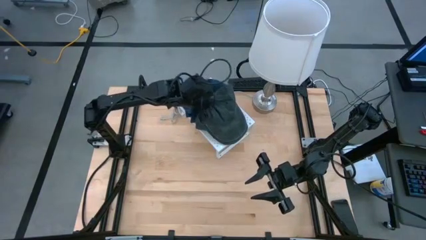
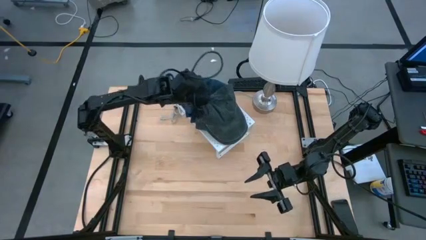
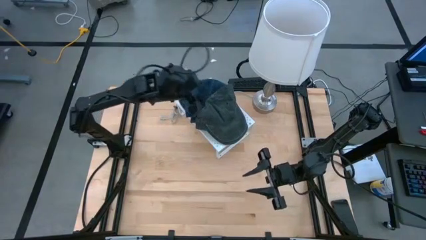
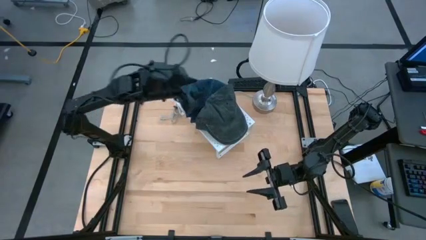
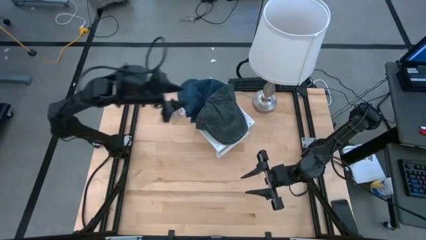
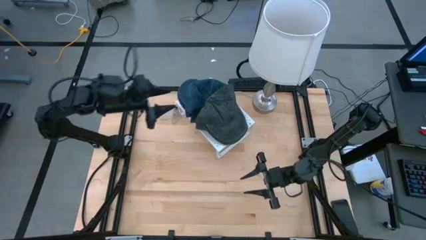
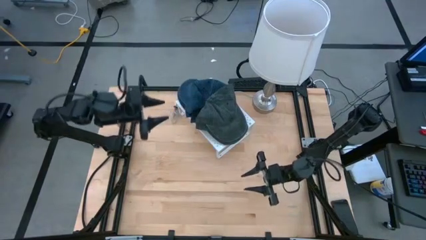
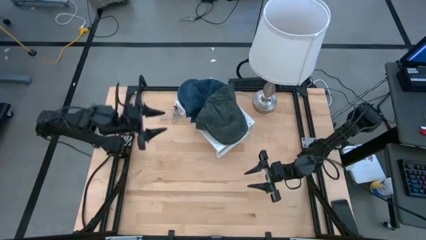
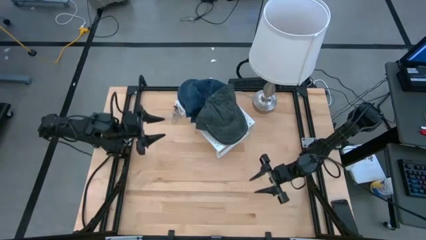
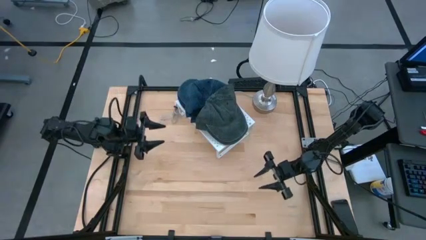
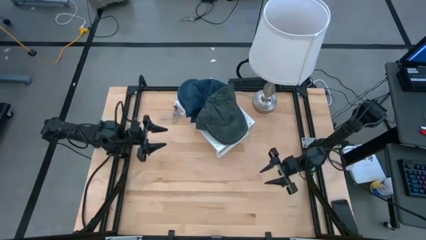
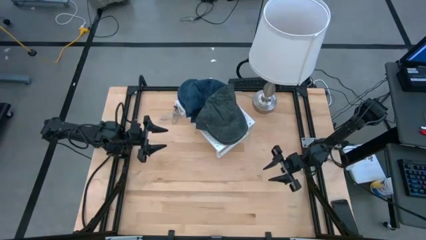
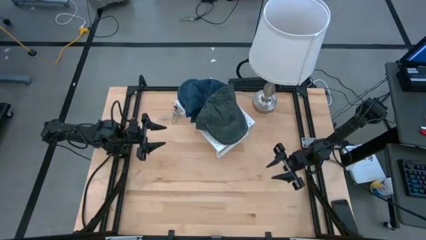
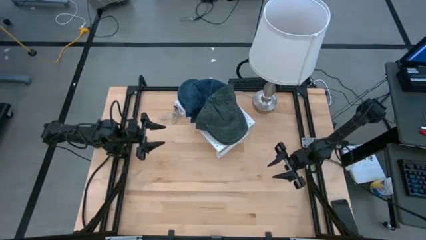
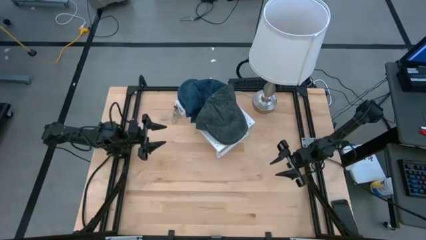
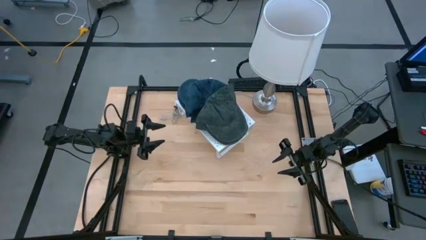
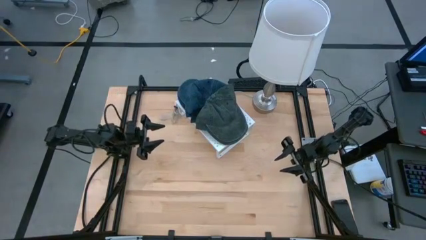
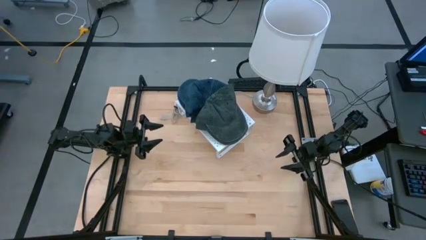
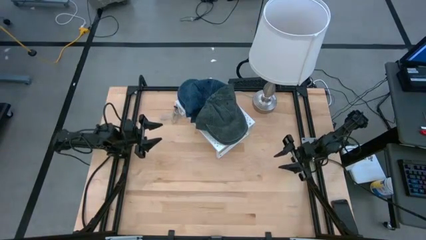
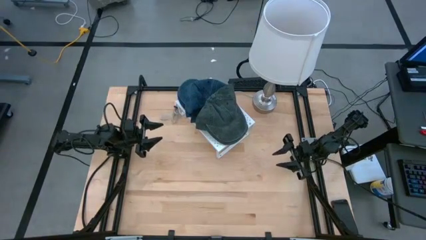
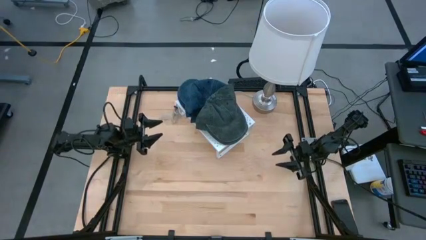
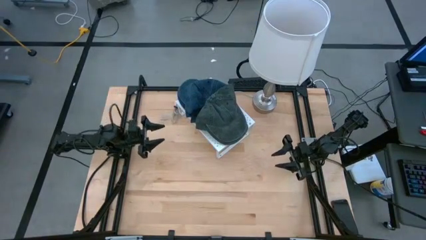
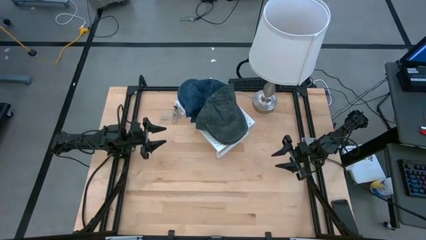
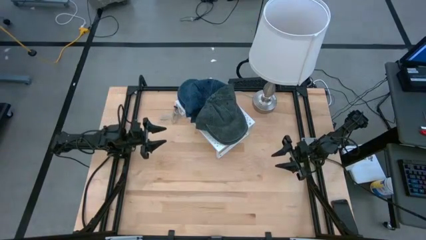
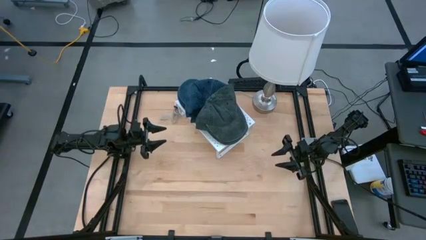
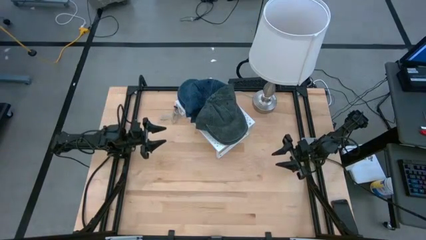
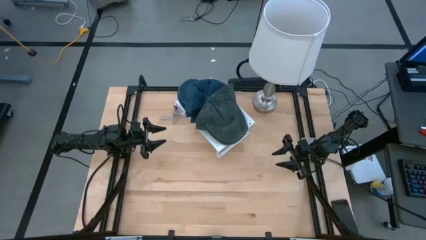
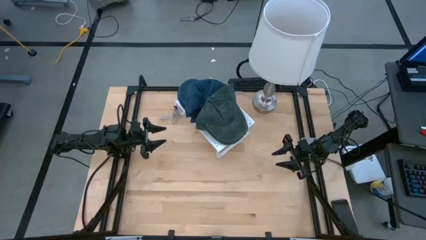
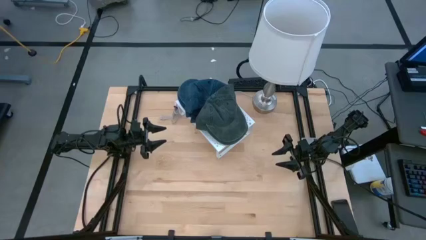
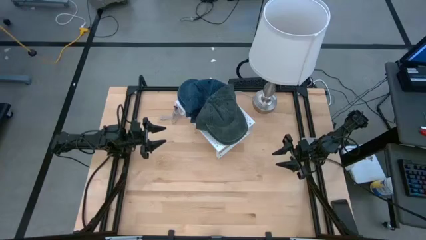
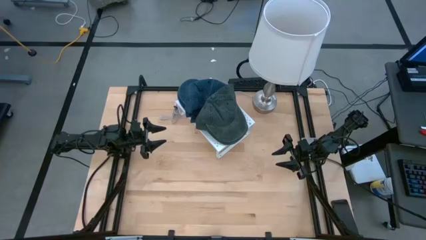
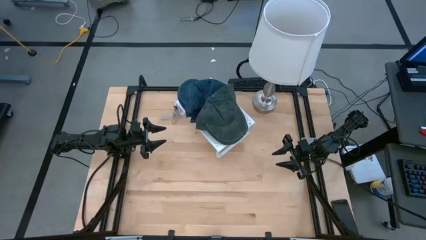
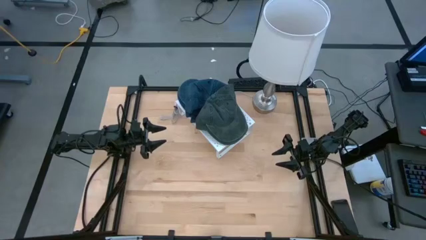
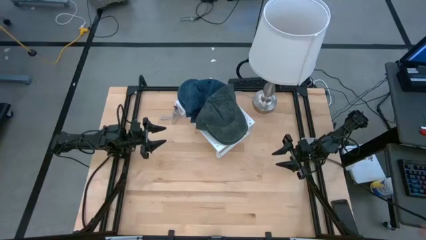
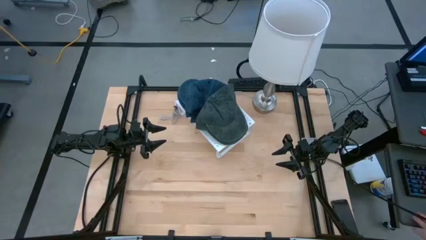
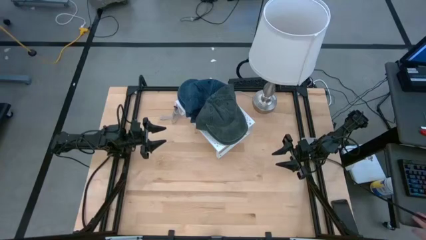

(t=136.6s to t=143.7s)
Task: Pick & Place hat
Return to Home Position

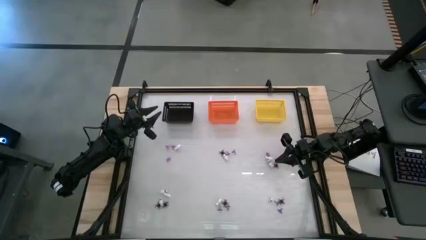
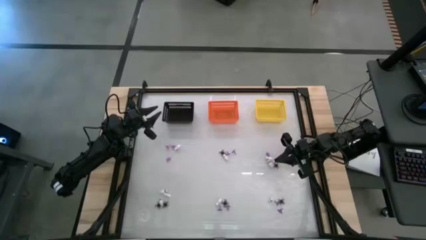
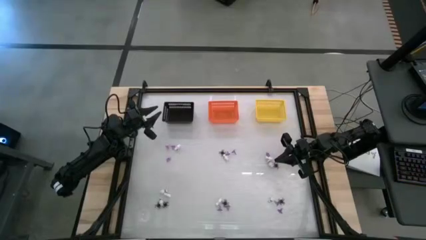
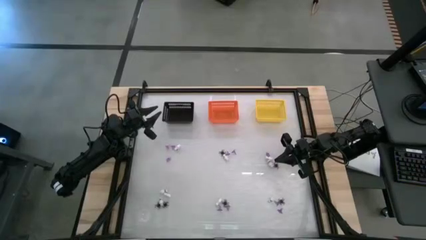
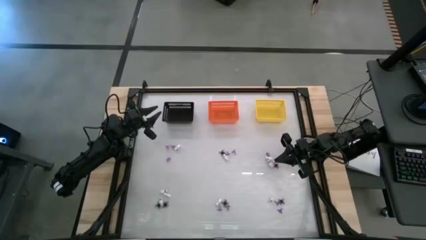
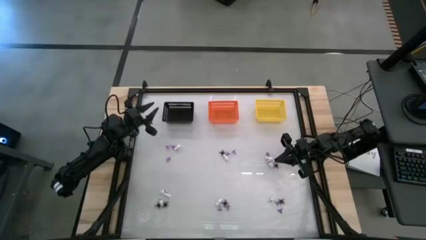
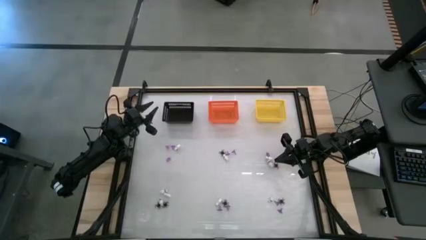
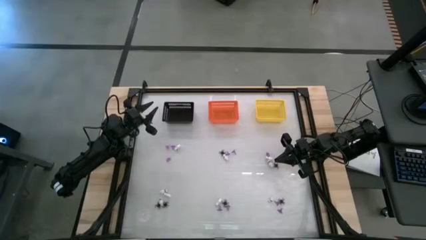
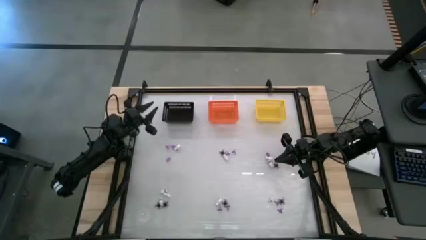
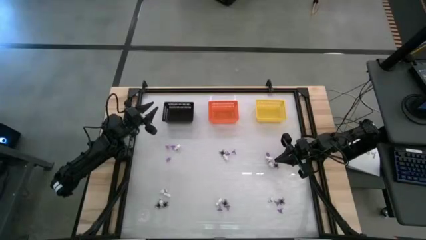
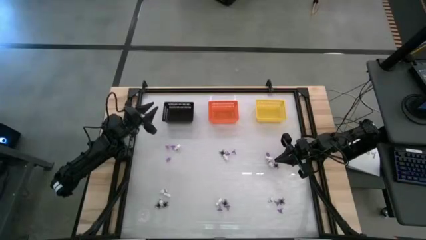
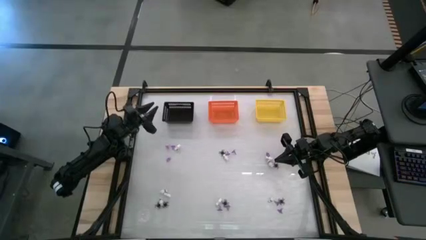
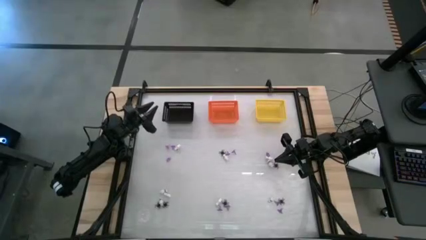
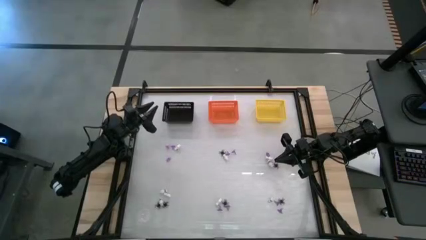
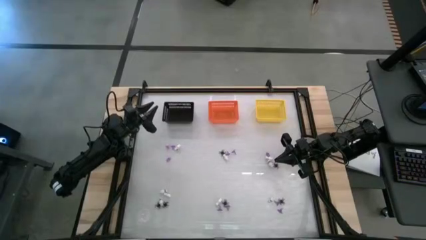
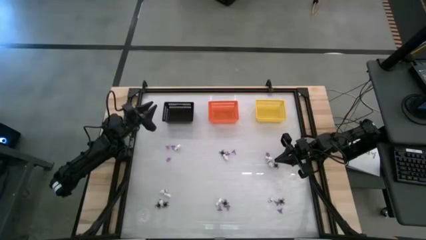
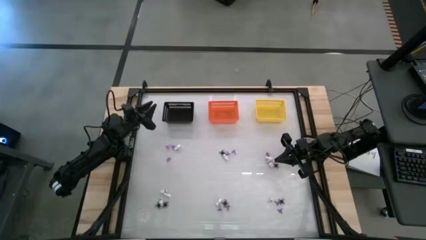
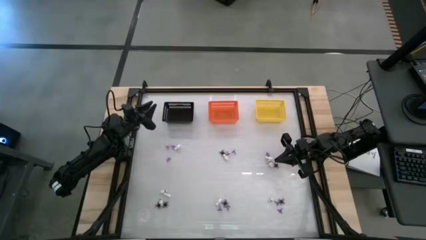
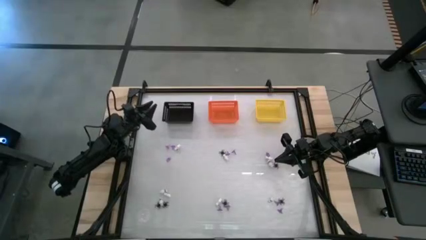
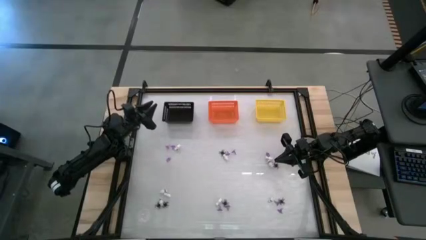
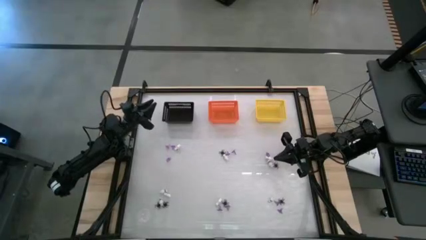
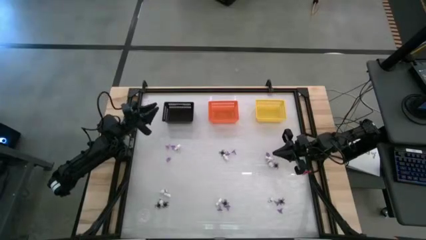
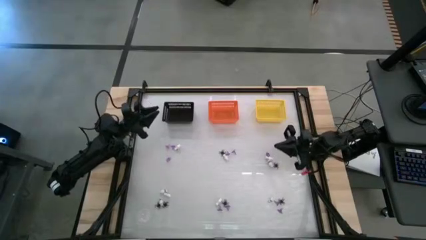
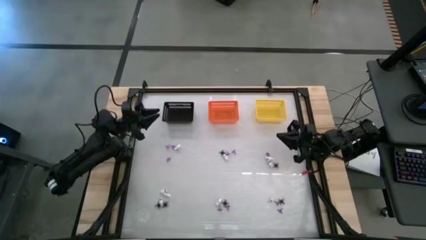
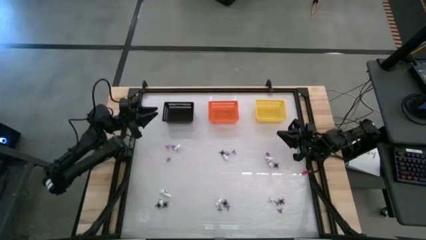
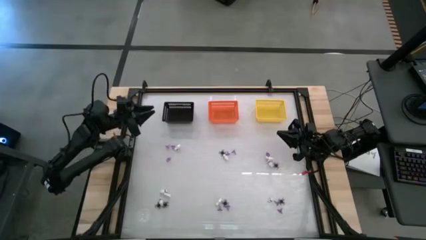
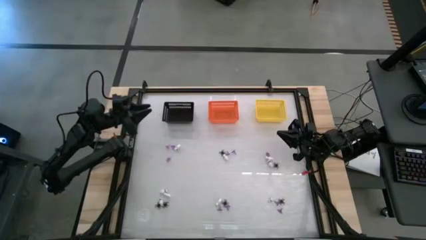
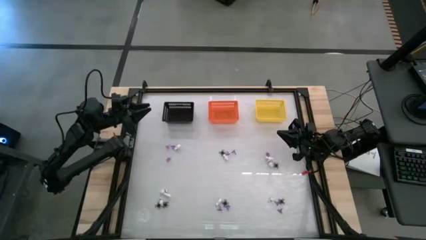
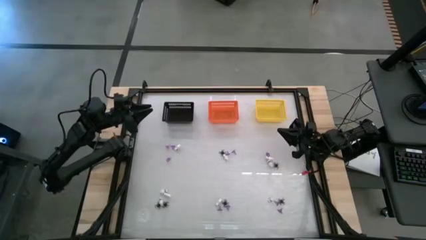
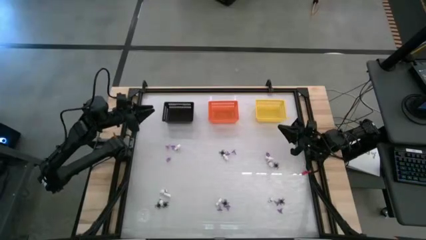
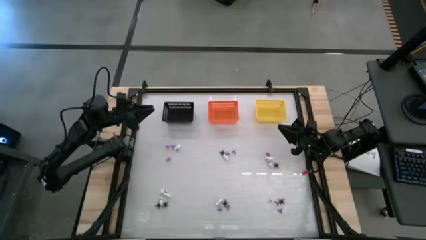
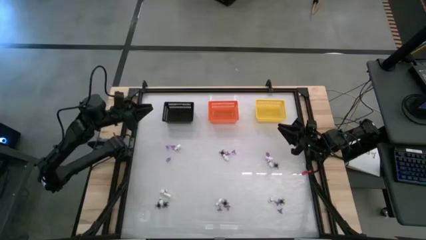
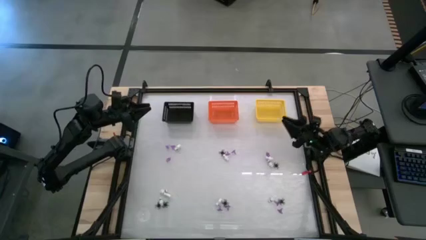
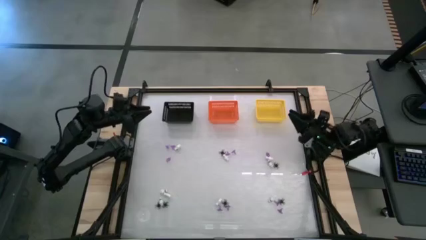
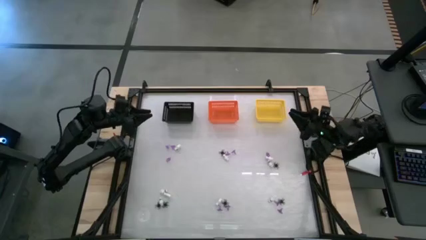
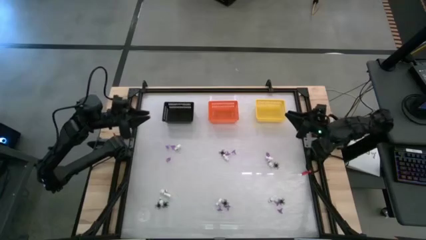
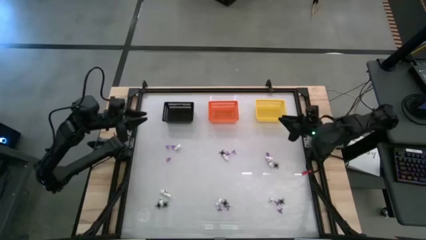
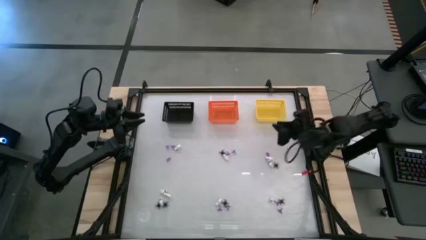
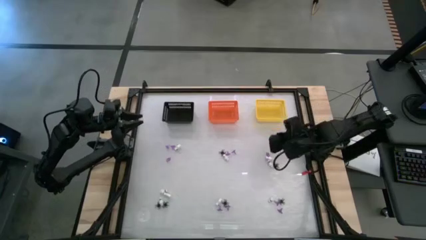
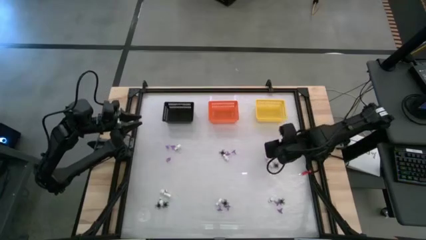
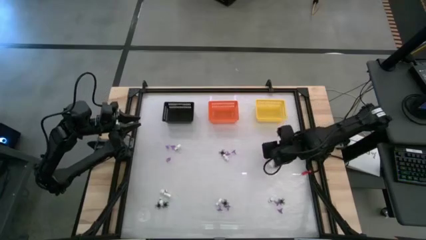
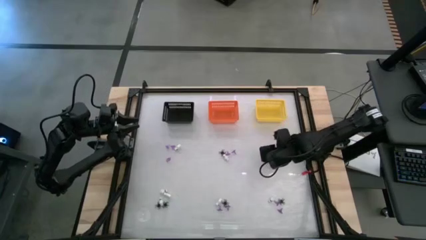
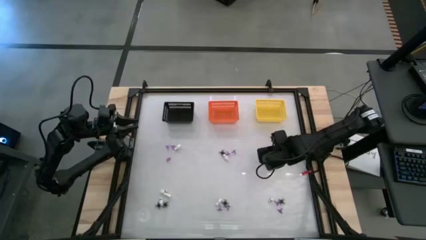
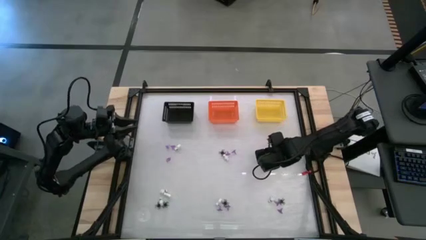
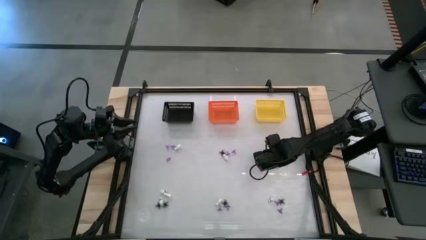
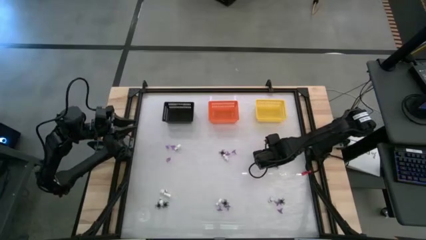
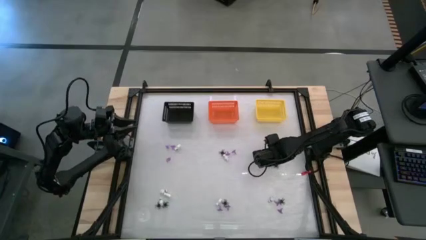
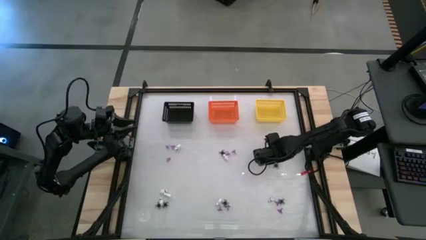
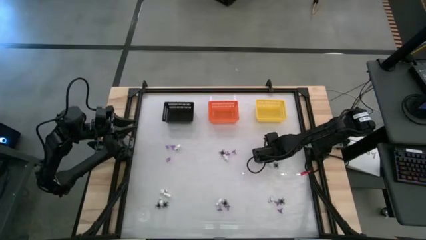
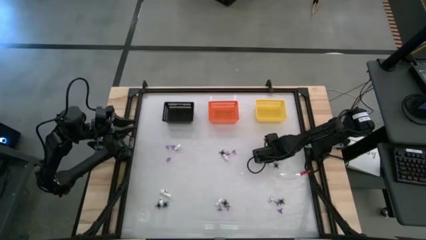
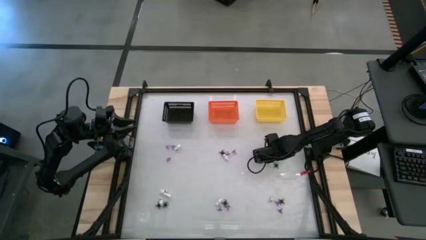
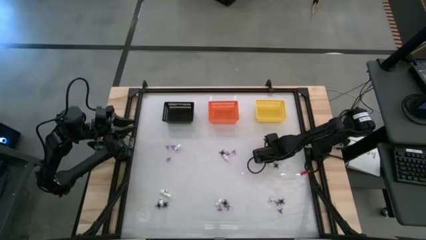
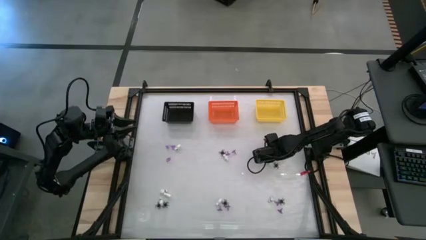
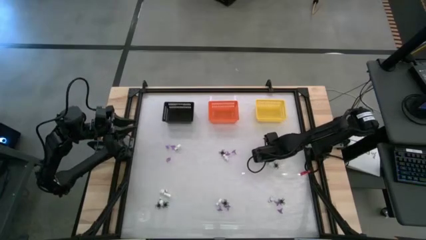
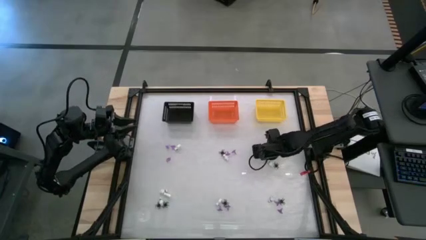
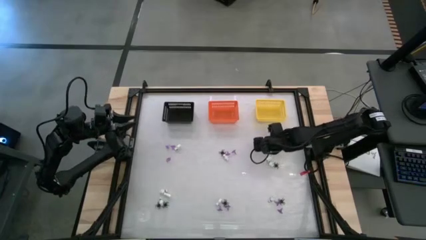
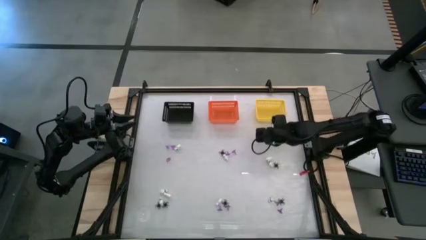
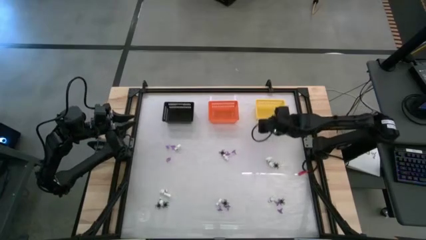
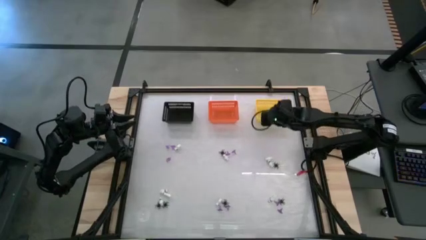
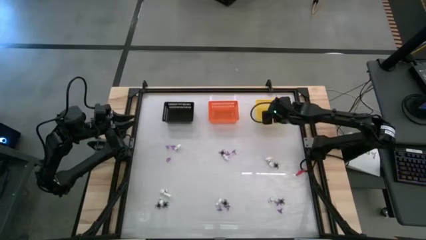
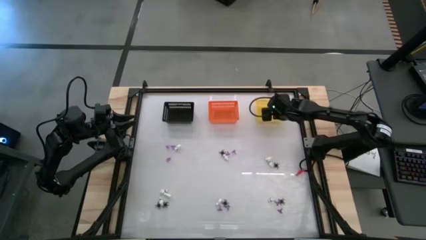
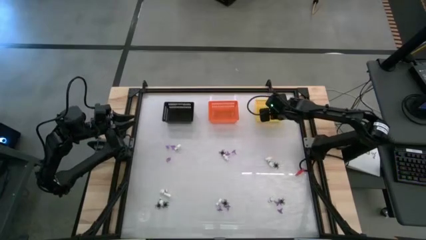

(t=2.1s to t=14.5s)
Task: Sort Halloween decoration
Put the witch hat toy into the yellow bin
